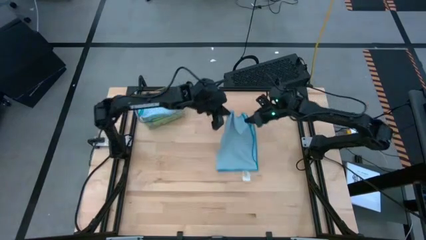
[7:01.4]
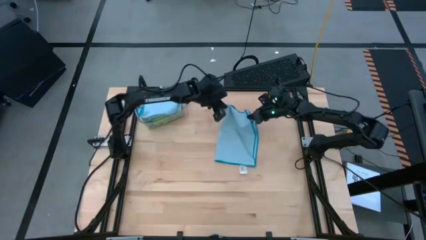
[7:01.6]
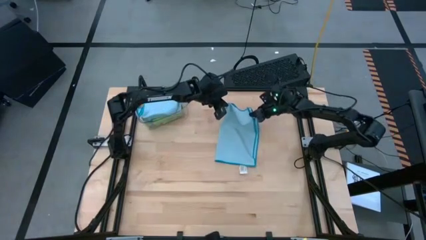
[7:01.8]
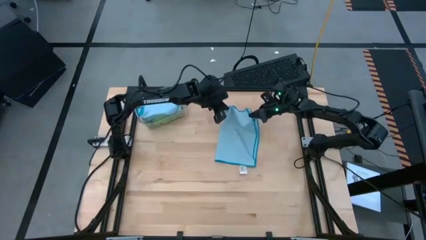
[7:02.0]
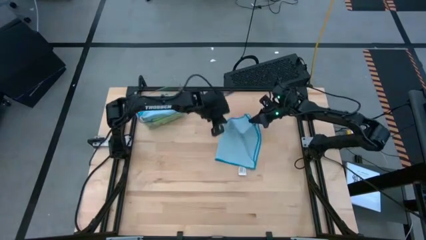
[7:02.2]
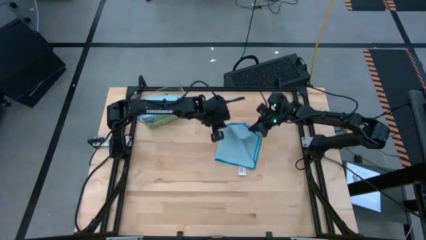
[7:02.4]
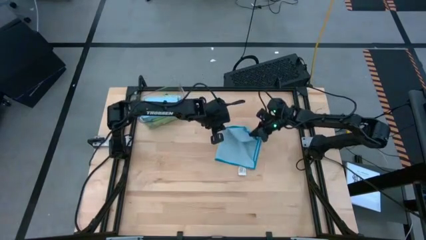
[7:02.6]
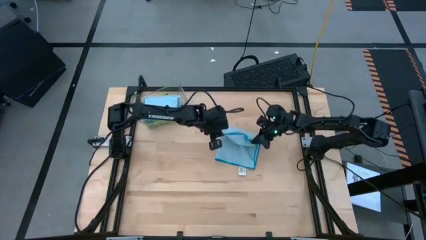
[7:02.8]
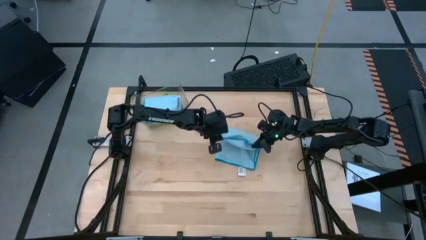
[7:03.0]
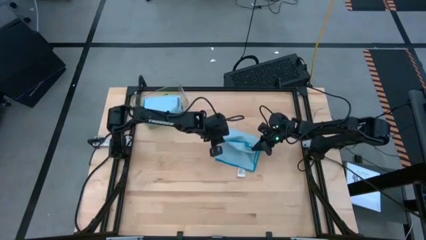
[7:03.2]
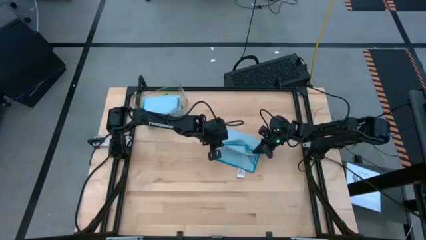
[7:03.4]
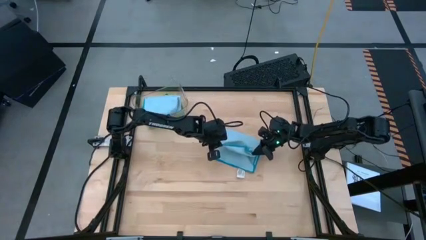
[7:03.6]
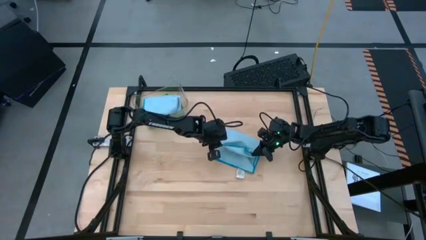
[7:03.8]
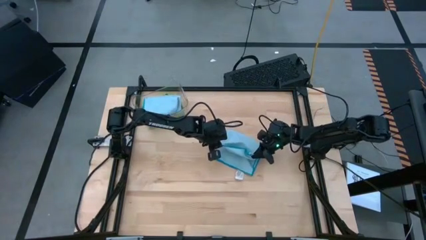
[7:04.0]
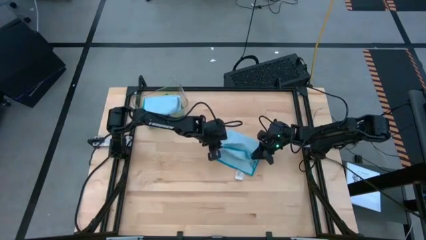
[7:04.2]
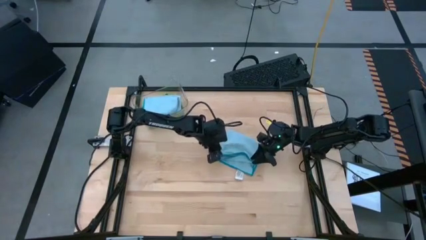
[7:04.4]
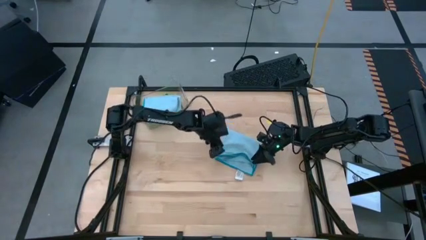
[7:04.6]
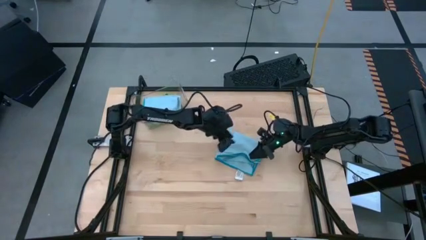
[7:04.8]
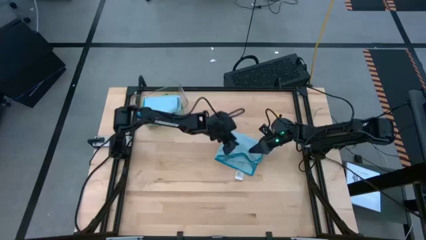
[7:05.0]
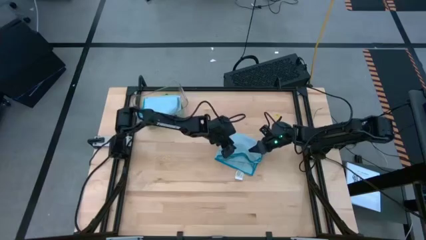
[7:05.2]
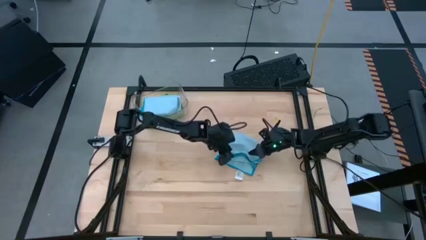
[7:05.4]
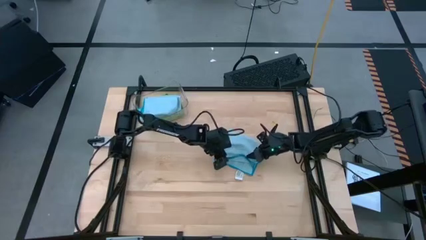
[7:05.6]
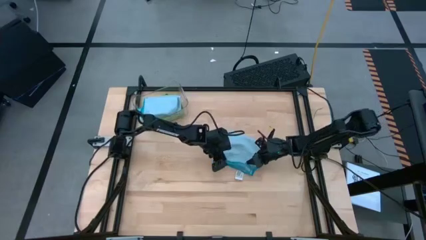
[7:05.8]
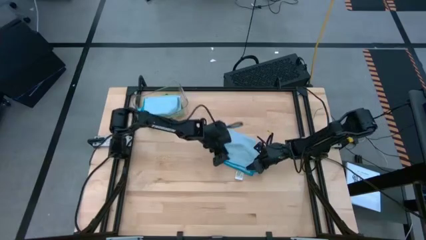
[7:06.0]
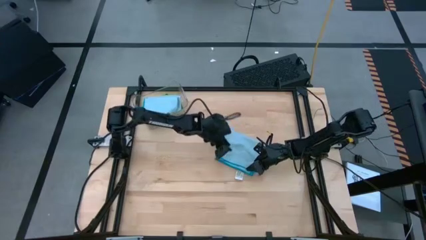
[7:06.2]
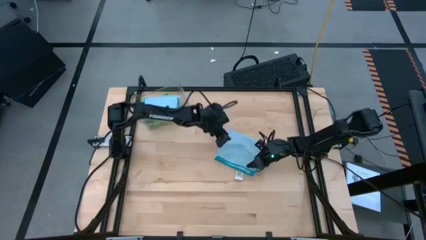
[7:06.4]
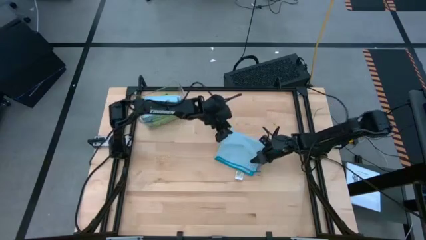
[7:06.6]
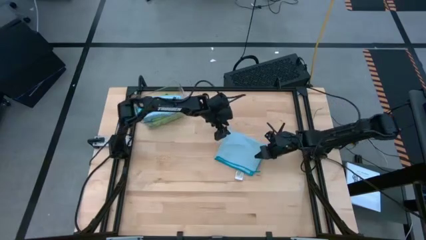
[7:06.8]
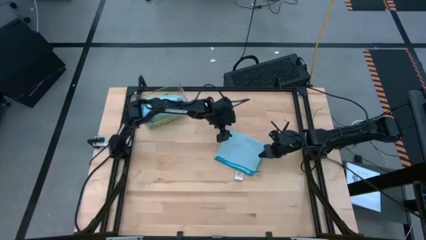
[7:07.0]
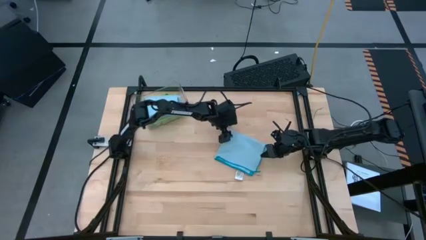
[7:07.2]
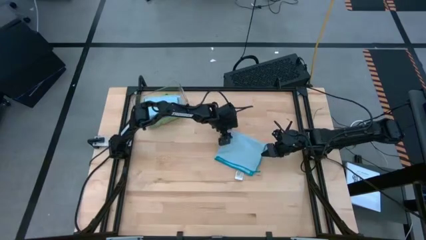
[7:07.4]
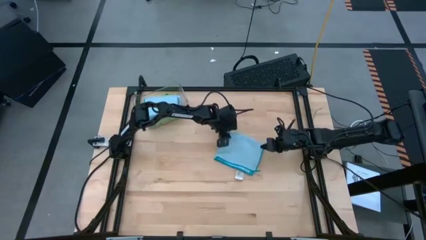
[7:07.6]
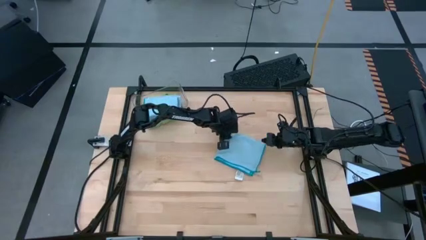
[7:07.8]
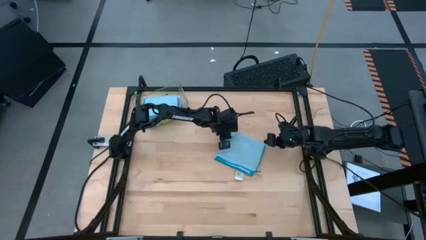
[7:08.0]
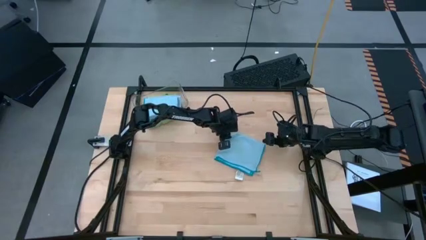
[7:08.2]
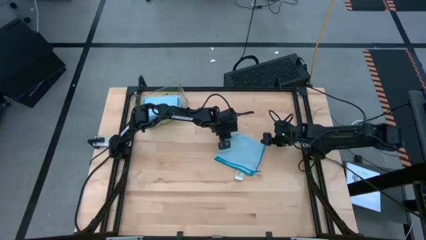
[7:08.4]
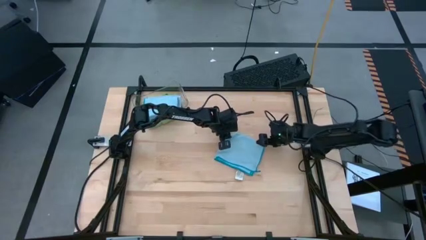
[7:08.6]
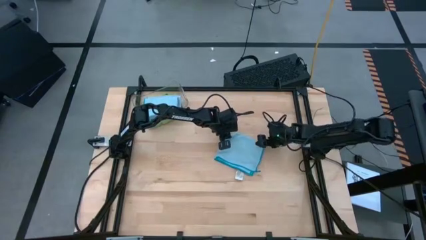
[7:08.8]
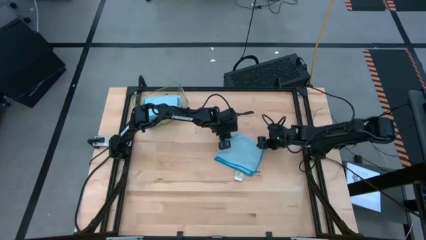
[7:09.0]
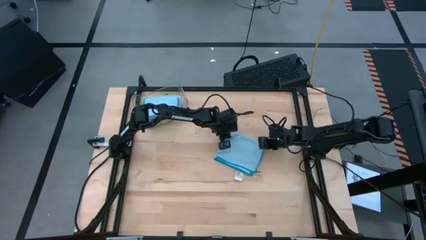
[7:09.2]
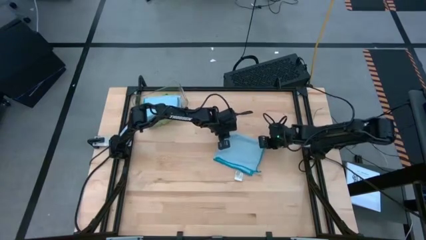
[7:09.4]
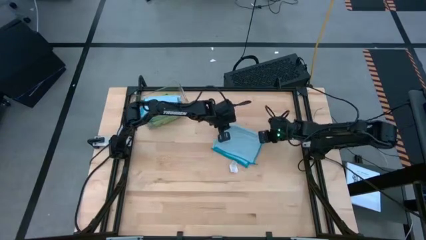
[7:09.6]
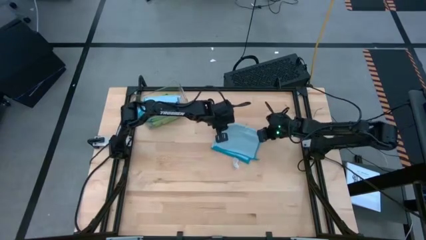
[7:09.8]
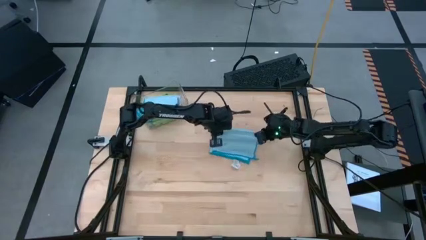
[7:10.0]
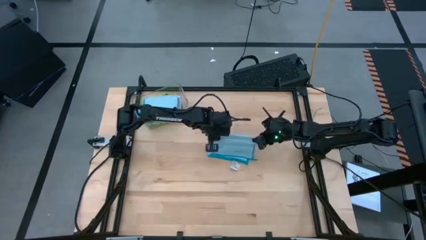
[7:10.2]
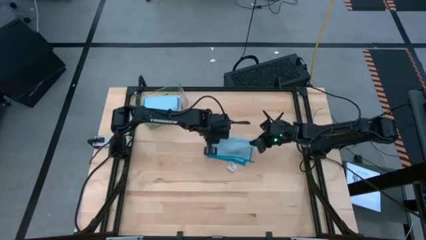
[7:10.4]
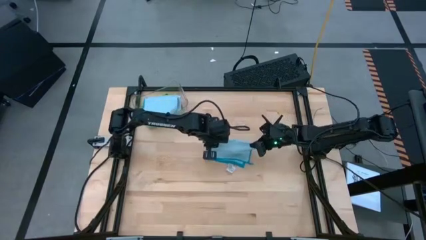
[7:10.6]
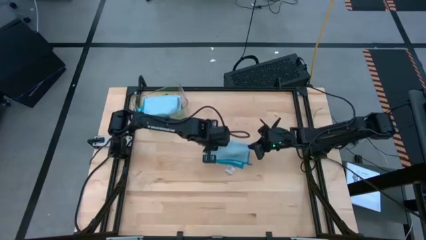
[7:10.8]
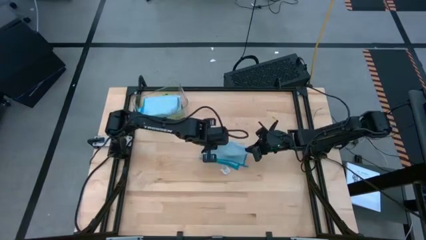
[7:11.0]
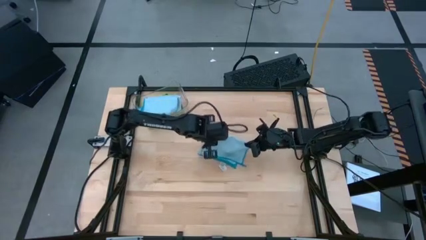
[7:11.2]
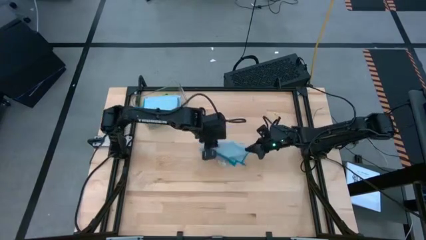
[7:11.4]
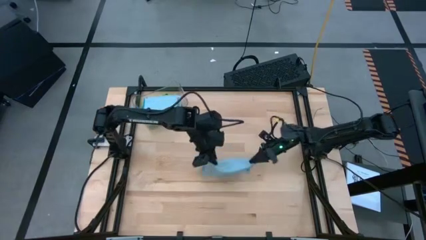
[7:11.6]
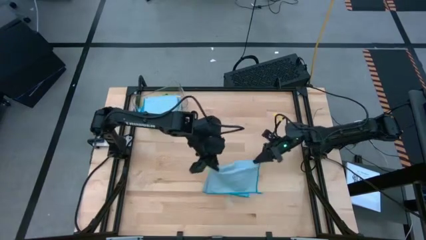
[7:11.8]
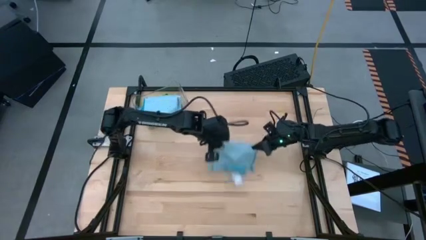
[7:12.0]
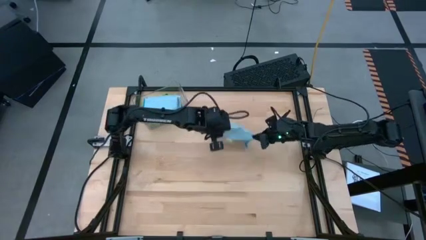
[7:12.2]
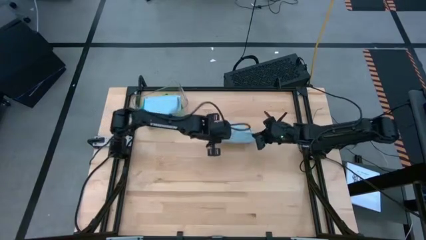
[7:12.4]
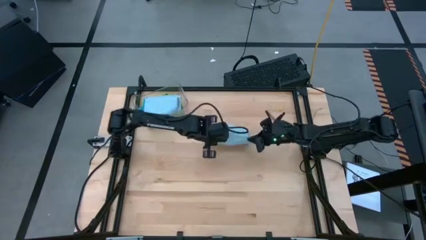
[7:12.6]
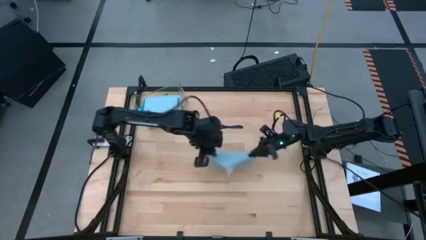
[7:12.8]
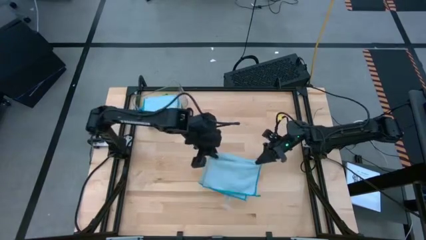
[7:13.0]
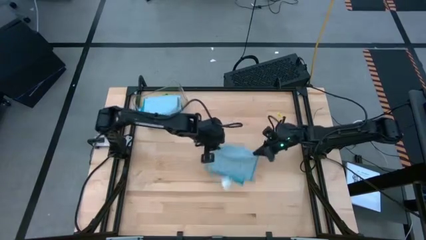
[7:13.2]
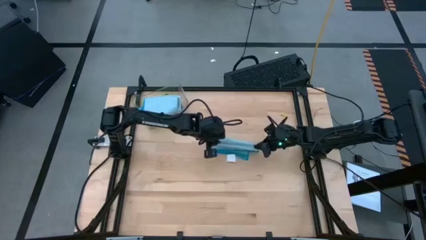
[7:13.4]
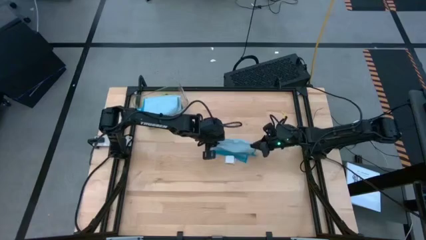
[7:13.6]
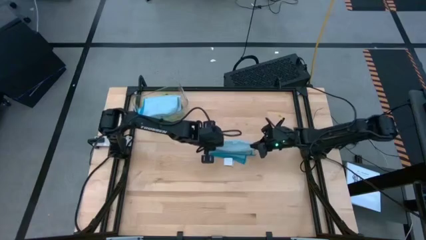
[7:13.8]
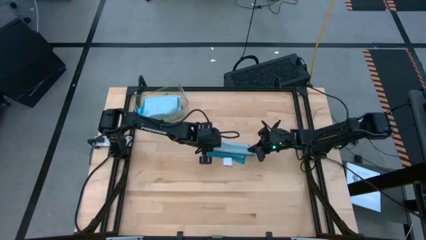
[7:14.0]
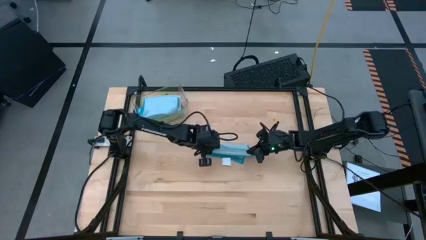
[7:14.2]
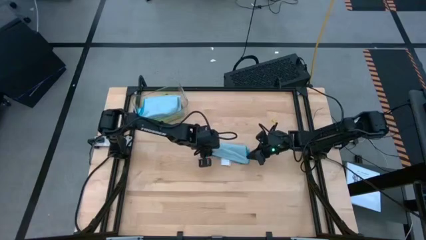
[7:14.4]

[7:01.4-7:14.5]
Task: Fold microfiber towels
Fold the blue microfiber cloth

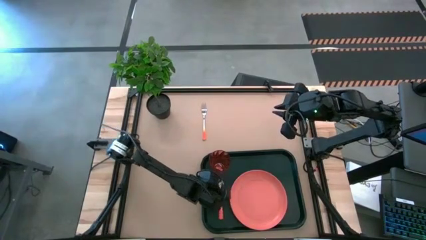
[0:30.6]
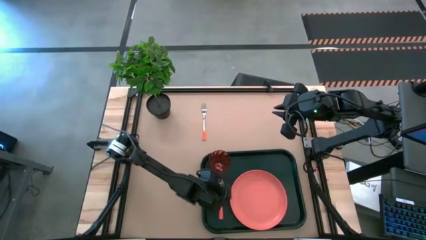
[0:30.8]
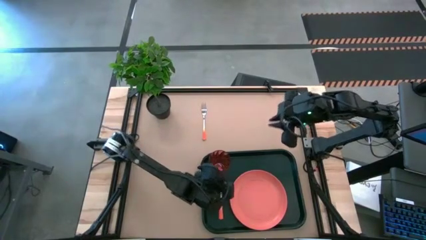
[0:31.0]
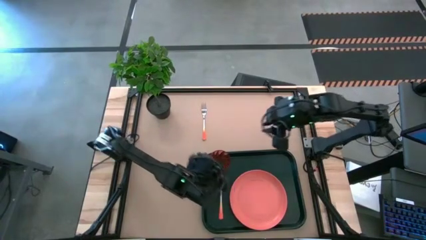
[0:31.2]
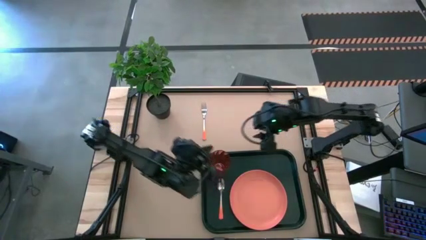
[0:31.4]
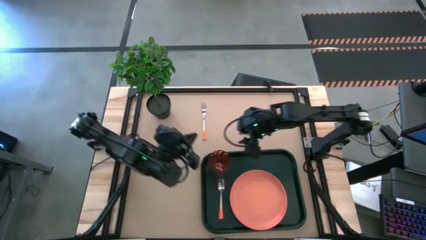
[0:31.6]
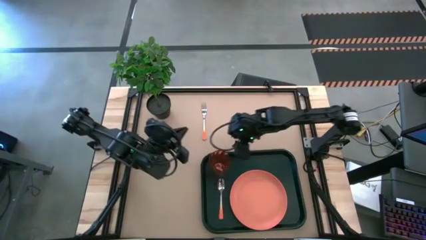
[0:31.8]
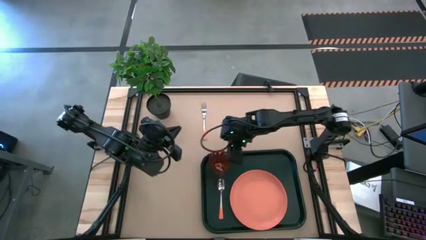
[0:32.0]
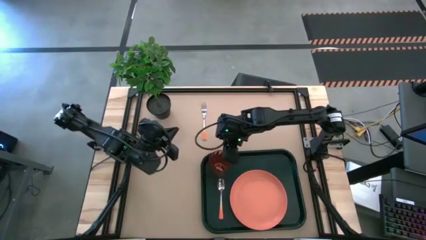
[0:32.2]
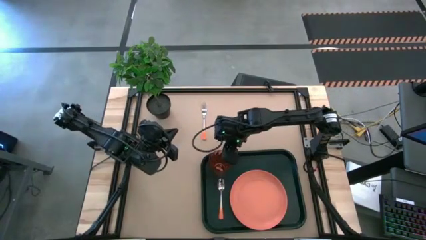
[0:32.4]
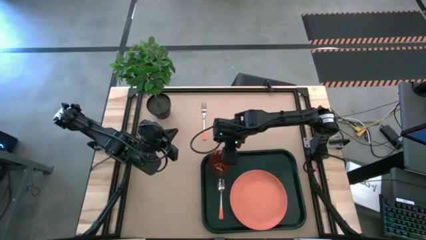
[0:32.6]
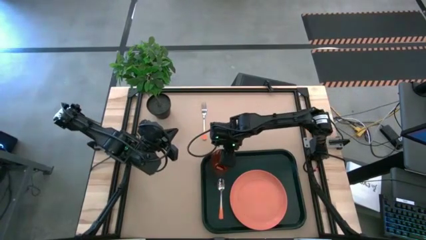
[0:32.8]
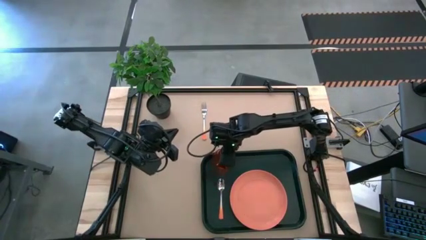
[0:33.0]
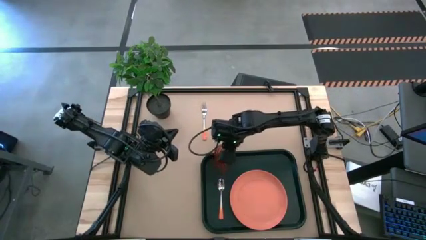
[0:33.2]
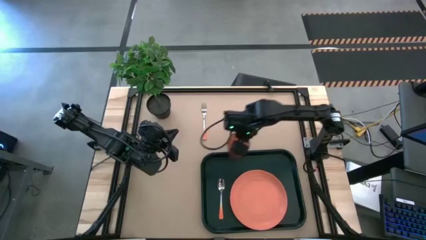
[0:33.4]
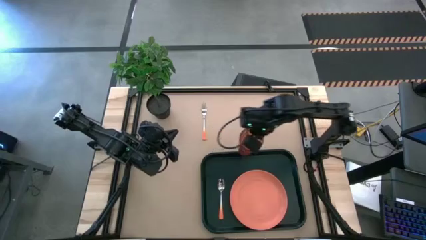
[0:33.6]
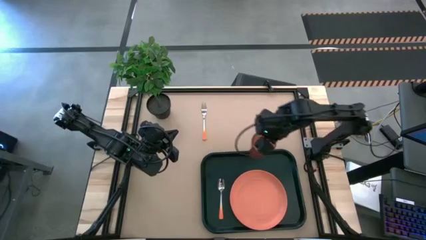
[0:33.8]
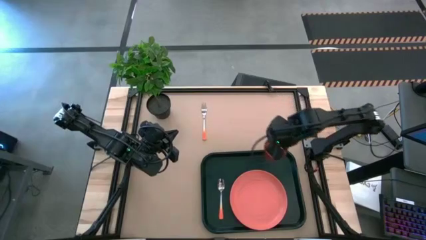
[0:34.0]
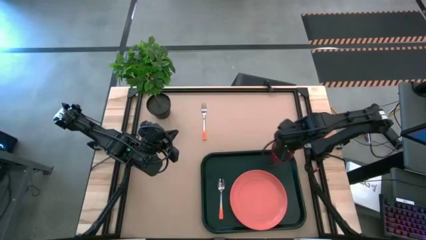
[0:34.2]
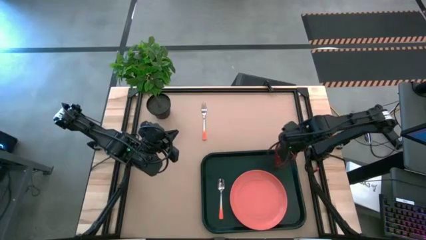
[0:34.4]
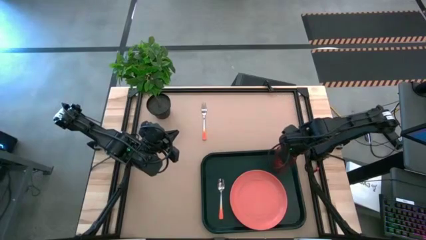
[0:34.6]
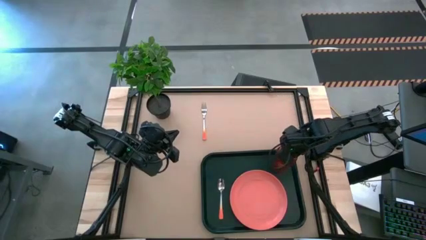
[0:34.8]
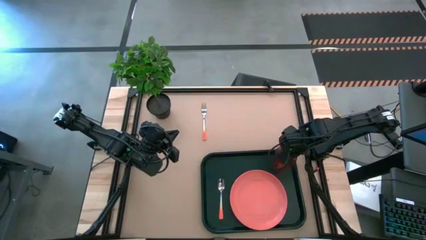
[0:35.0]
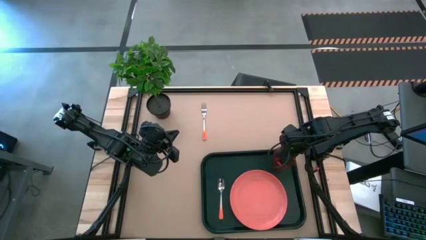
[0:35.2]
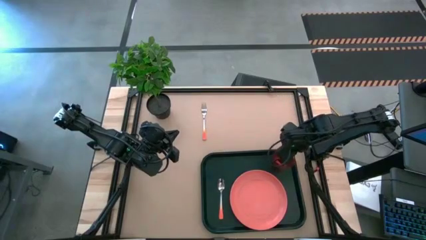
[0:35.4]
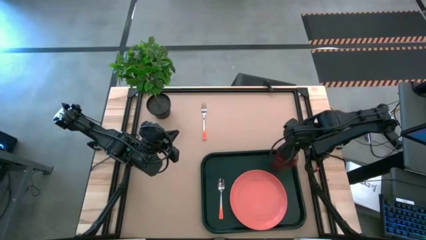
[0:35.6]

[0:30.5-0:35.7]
Task: Pick and place plate/cup/fork/spoon on tray
Move the orange cup on the black tray to the top right of the pink plate
